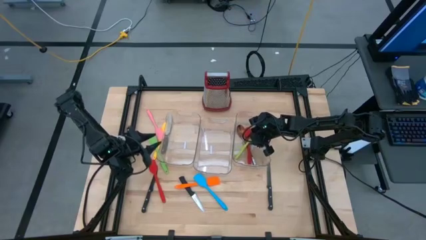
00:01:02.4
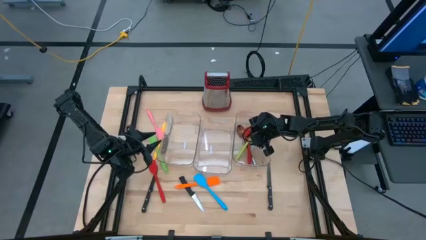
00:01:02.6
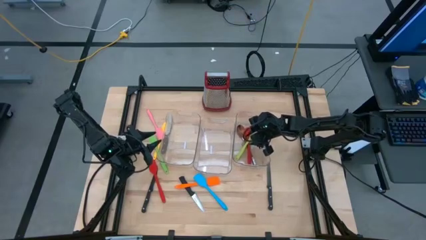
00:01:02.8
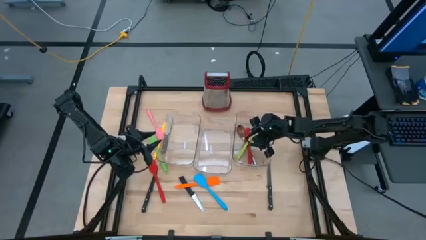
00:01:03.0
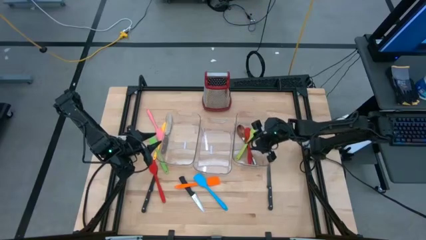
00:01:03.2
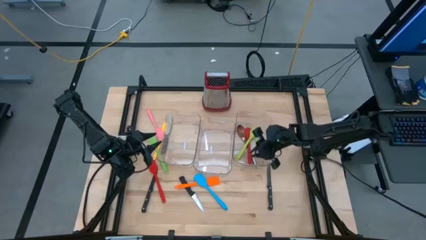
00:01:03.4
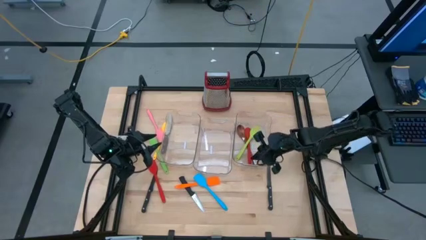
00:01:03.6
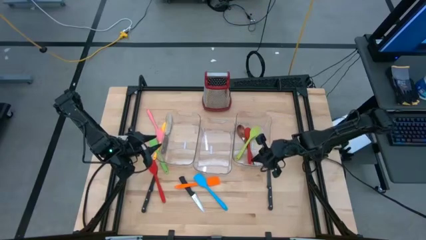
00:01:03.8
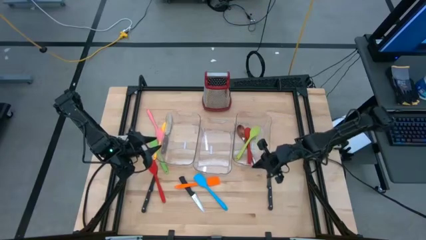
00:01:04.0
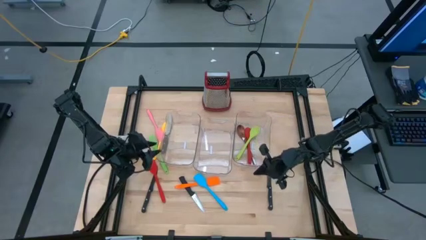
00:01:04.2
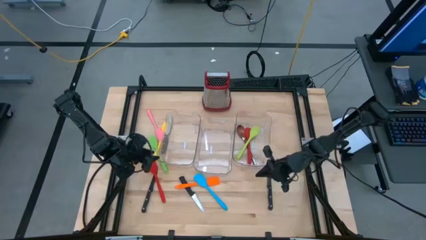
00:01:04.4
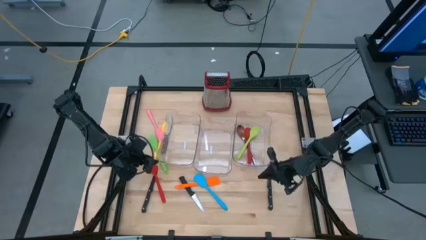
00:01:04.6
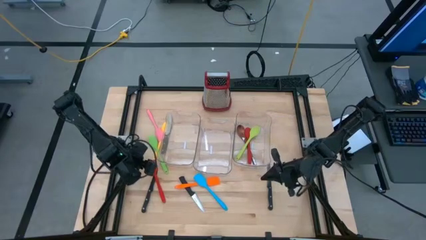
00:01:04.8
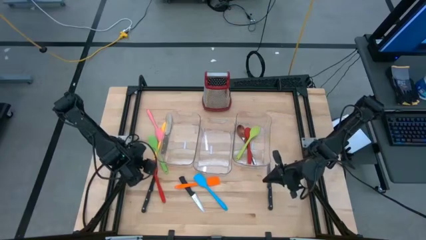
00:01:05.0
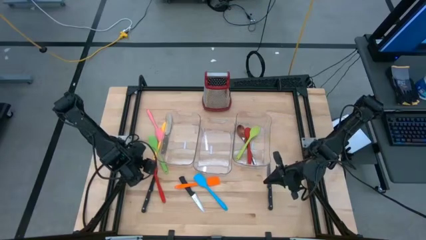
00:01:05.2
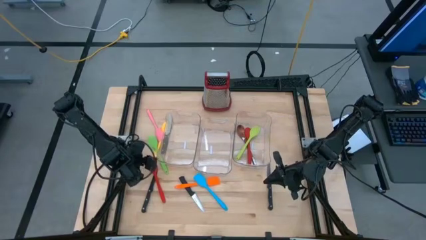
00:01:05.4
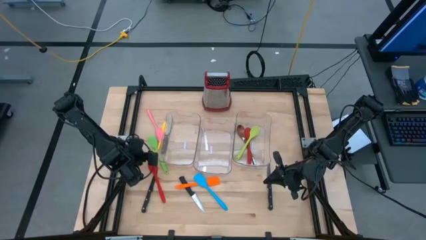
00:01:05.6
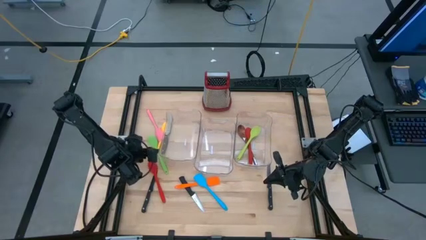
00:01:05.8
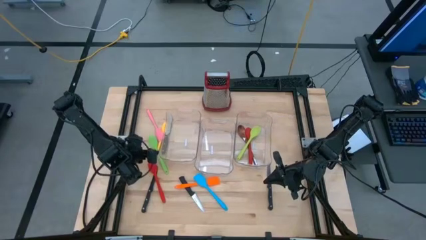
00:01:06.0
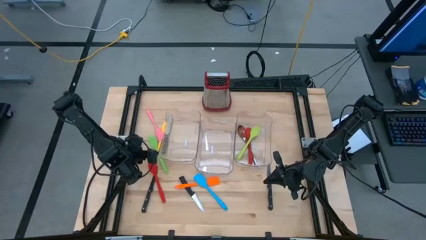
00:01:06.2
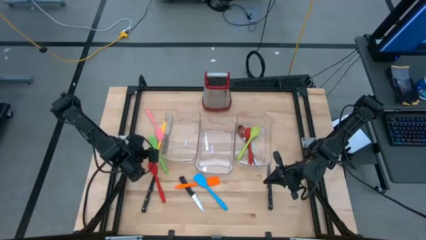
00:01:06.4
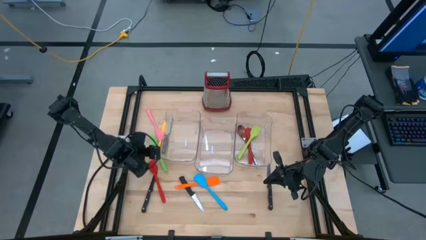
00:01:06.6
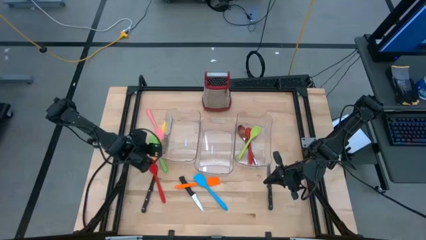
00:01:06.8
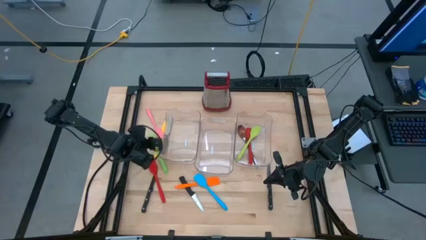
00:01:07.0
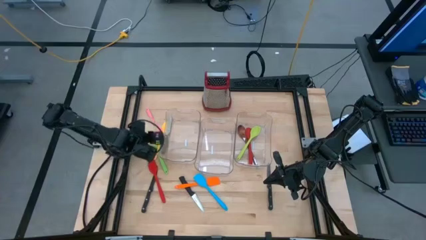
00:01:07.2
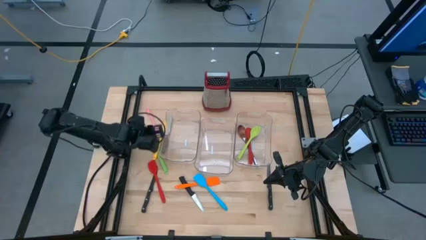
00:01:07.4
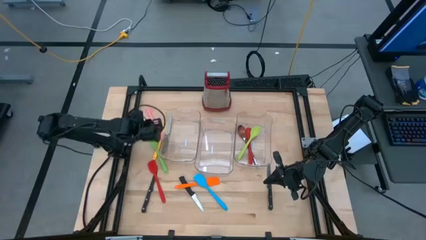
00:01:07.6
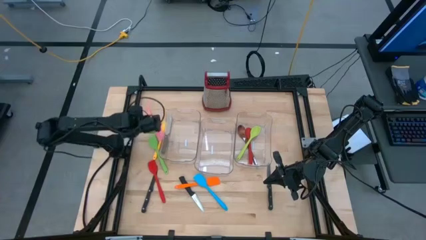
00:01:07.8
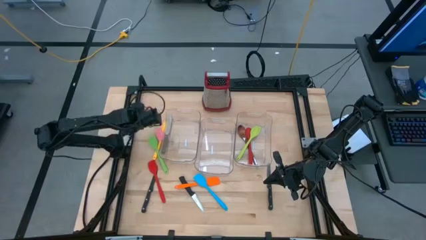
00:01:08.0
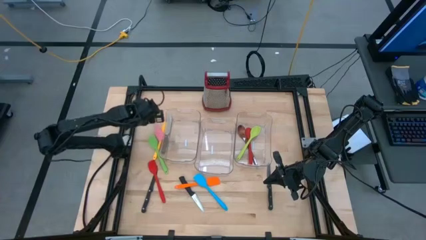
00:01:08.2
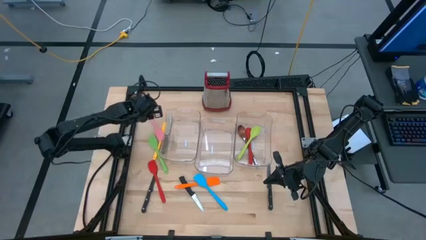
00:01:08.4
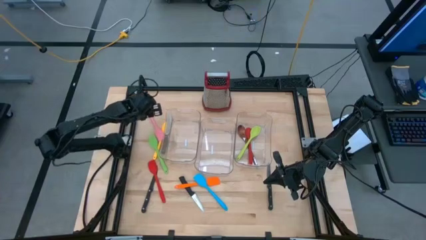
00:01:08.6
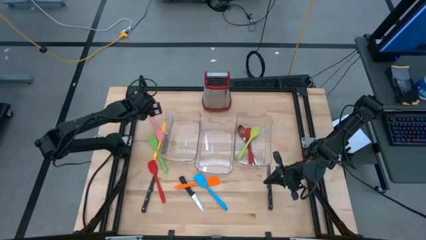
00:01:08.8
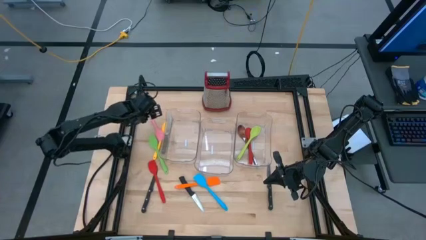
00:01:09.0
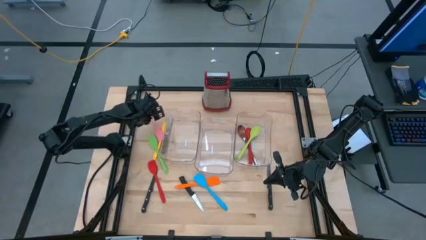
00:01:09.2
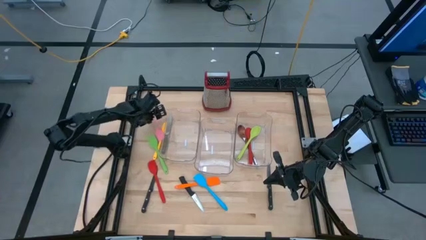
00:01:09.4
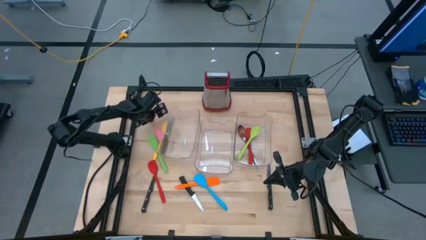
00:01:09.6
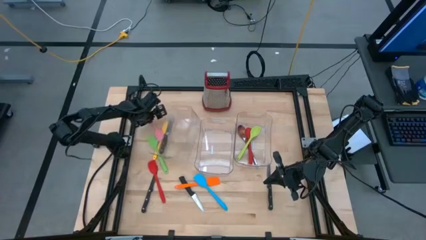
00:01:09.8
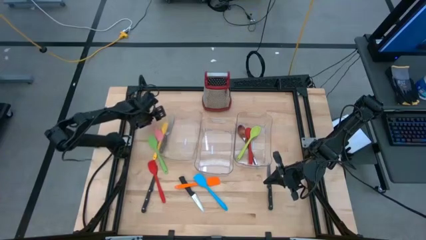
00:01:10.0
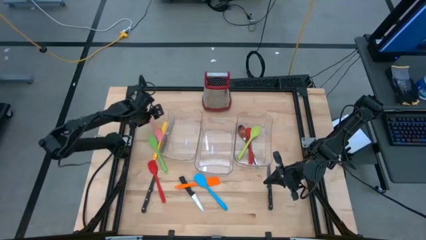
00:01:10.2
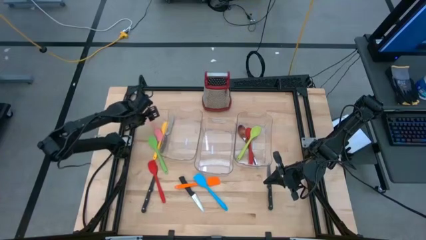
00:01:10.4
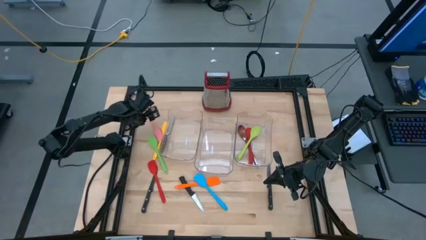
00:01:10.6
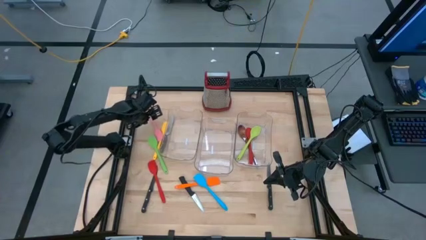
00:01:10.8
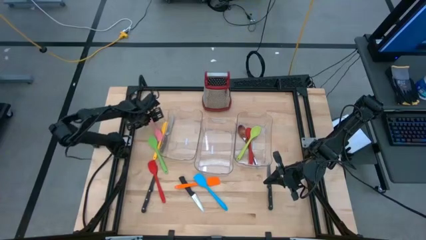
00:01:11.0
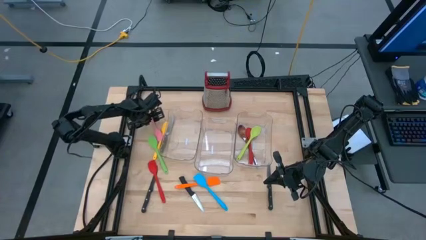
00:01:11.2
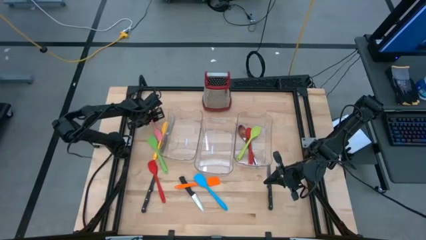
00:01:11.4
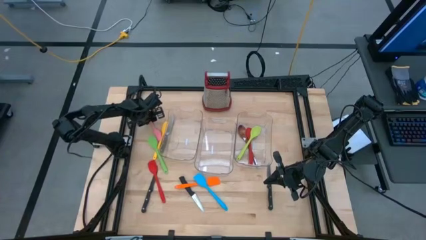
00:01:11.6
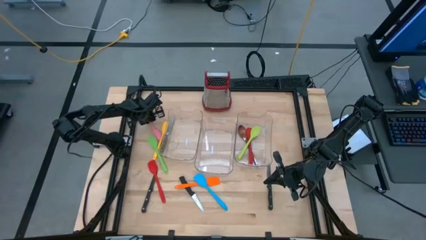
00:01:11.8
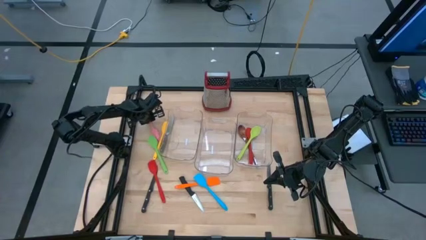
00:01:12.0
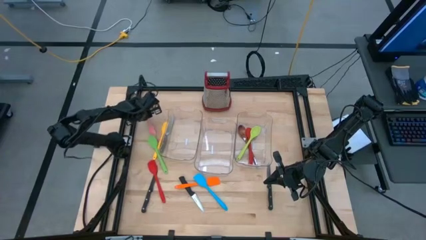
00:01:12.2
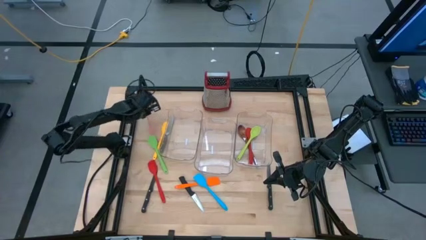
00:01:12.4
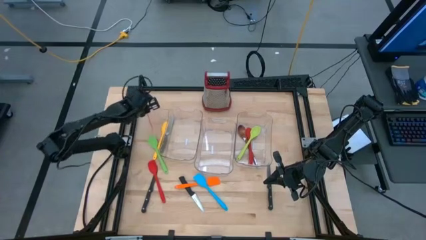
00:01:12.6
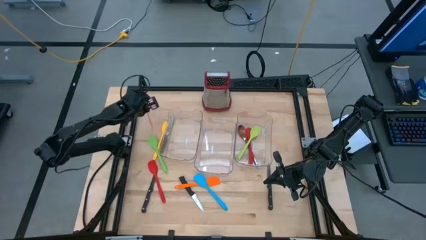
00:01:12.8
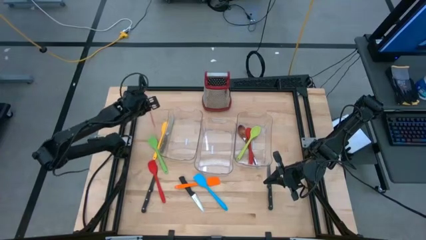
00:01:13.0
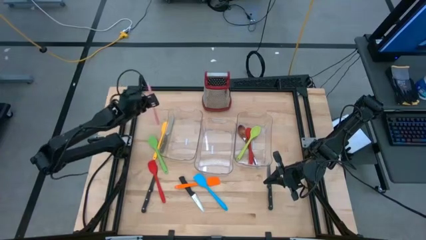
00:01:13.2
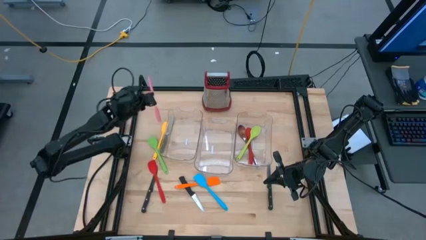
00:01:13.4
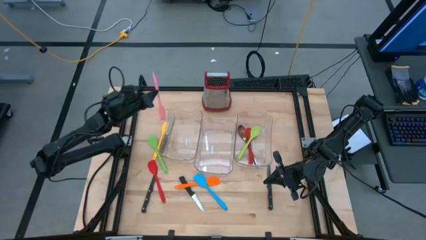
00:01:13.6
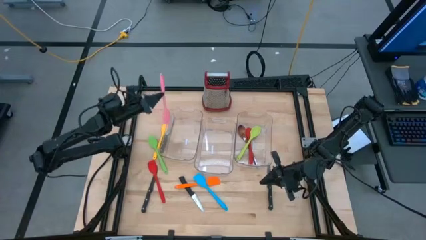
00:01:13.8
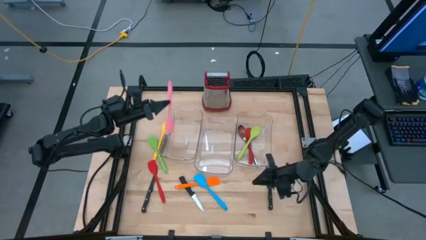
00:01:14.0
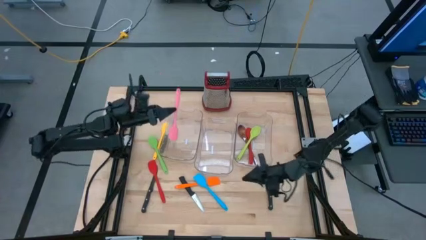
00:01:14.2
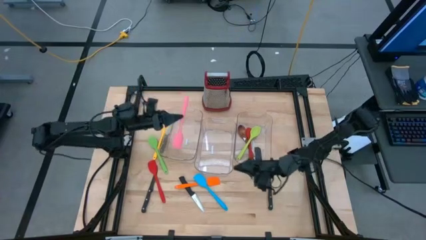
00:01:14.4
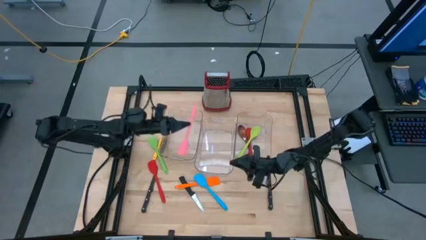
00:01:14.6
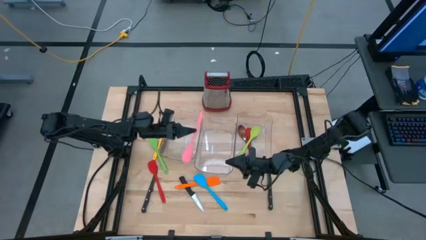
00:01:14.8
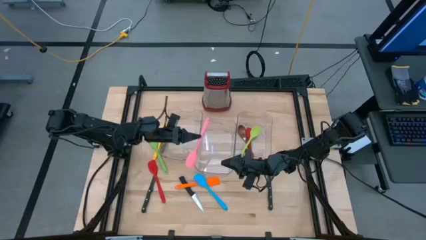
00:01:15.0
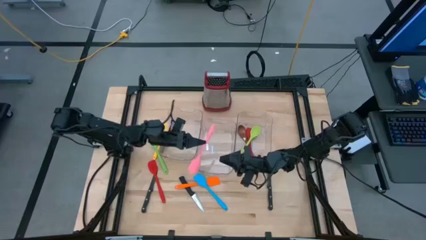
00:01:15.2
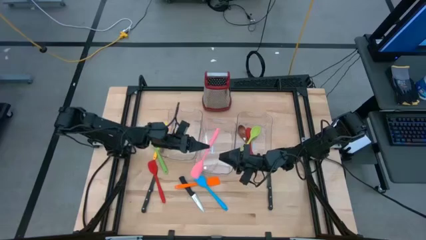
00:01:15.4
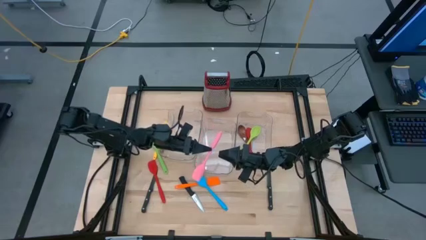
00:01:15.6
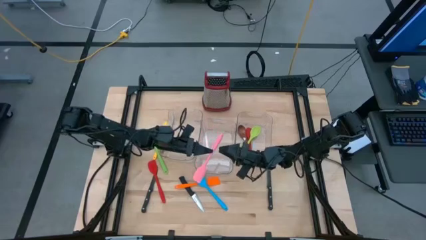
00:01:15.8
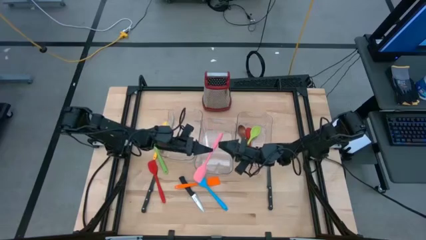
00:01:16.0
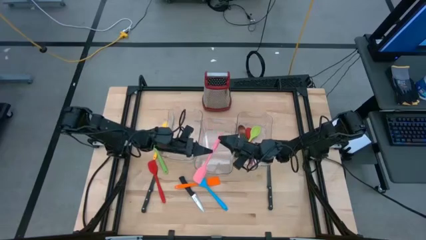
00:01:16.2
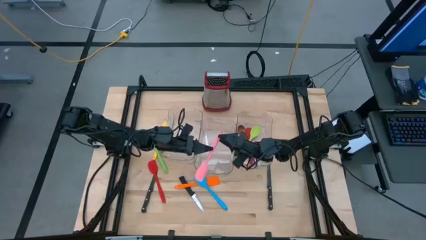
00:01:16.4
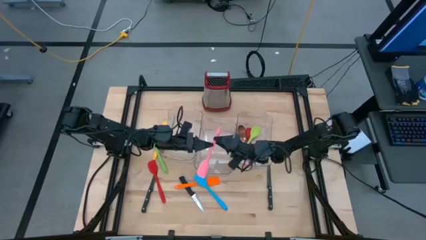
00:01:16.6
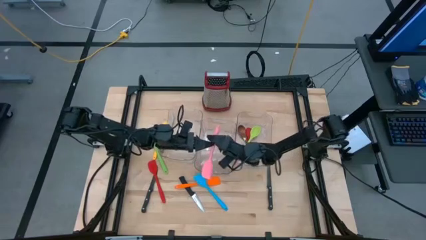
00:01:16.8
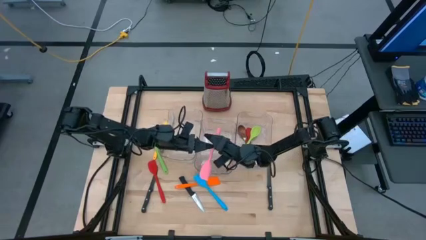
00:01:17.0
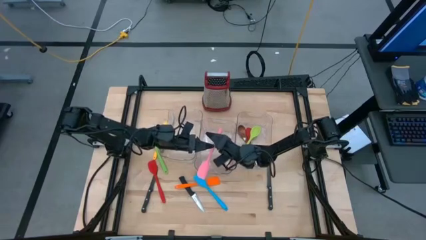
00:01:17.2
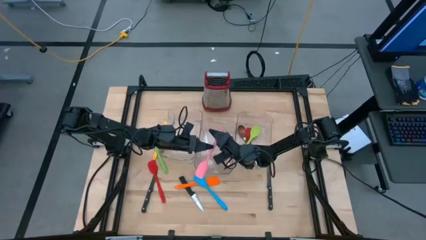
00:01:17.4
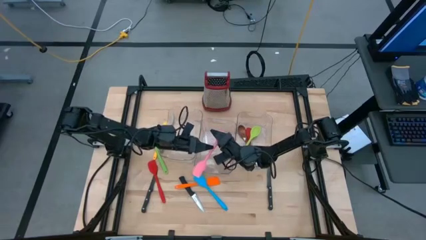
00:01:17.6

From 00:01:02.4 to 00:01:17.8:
Task: Pick & Place Kitchen Items
Put the pink spatula into the middle transparent bin

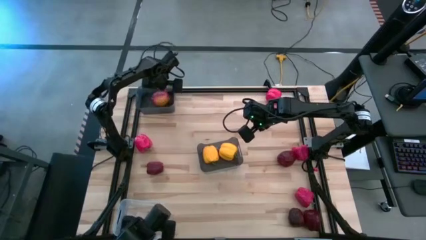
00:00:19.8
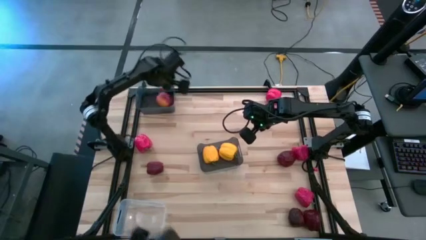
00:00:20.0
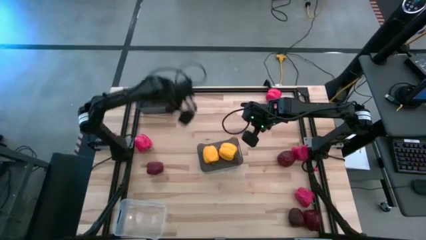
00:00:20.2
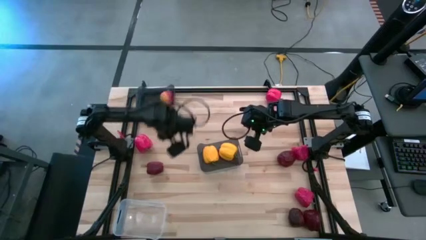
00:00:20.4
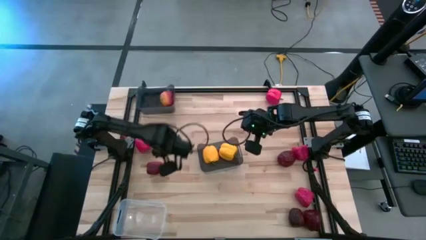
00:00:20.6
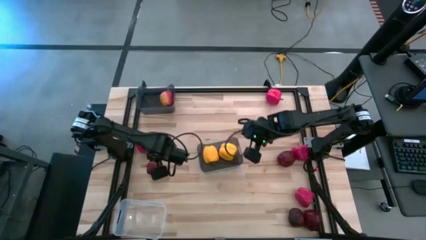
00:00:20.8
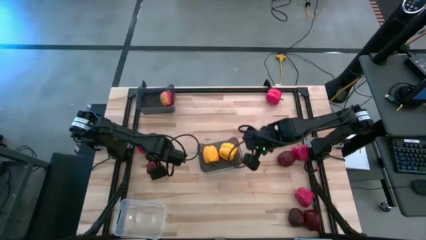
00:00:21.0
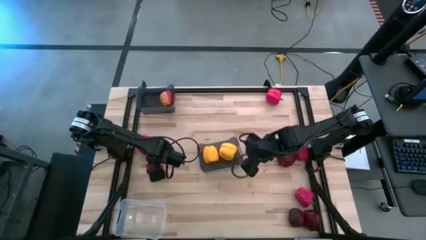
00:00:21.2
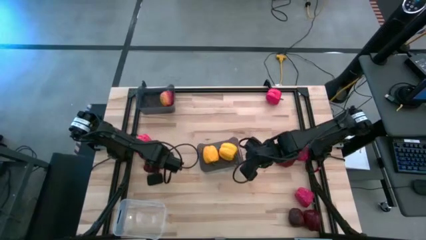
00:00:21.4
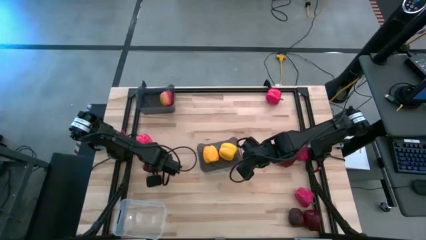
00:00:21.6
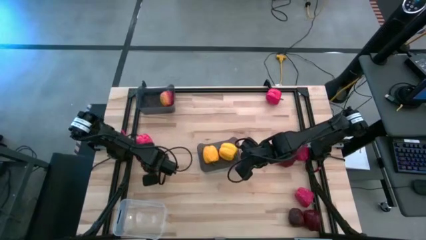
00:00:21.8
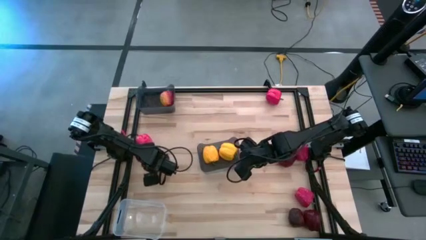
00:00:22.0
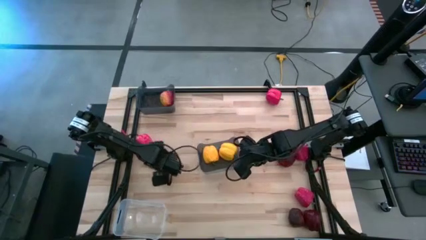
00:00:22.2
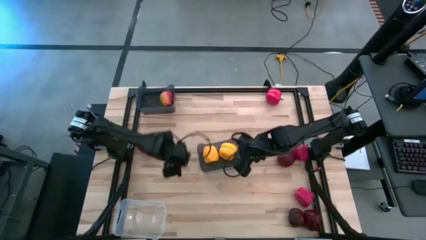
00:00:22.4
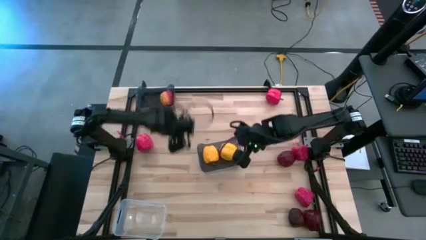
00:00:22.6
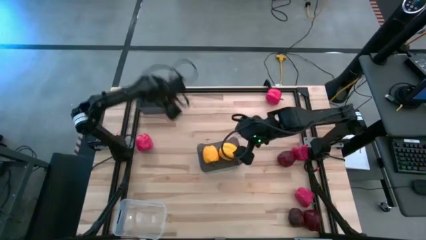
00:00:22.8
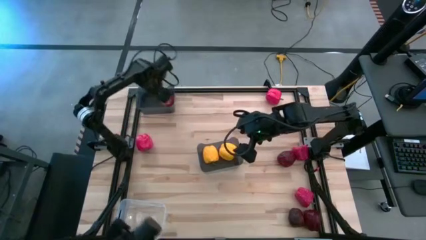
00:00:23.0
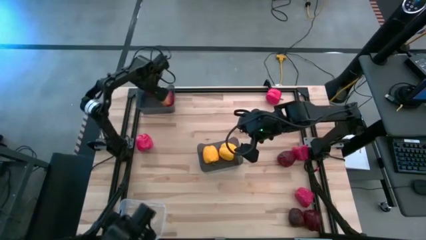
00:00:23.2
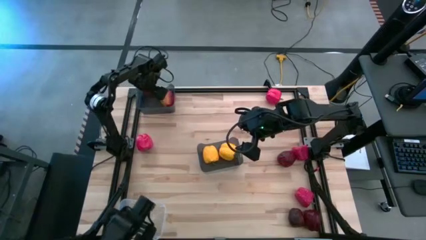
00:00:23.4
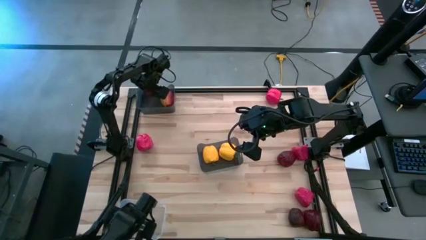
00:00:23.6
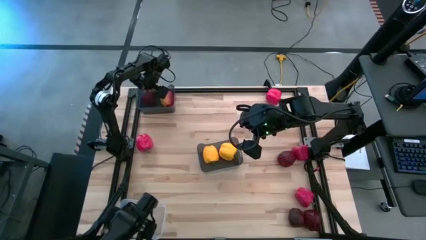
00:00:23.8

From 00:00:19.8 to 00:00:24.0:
Task: Sort produce into baskets
Put the top left apple into the top black bin
